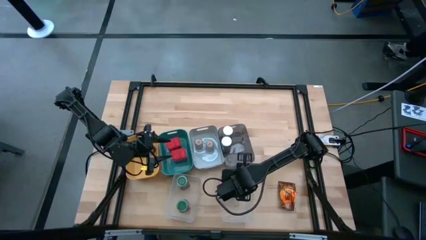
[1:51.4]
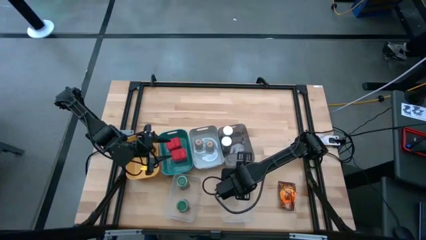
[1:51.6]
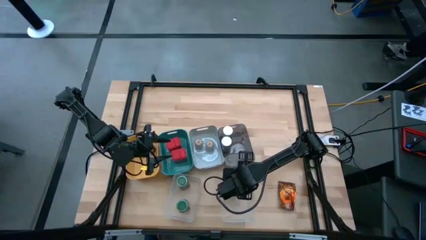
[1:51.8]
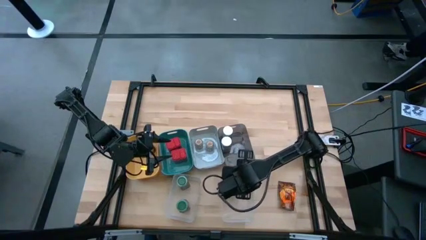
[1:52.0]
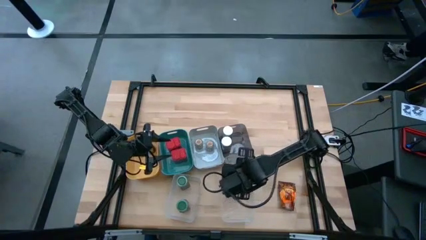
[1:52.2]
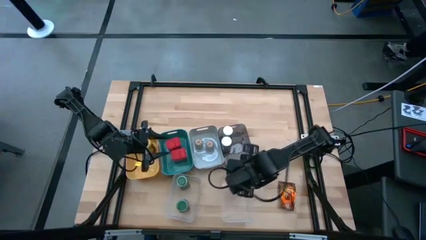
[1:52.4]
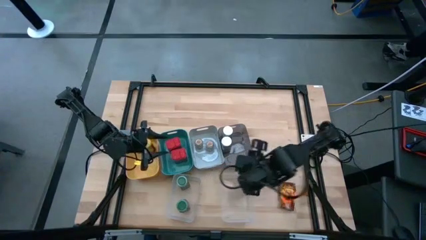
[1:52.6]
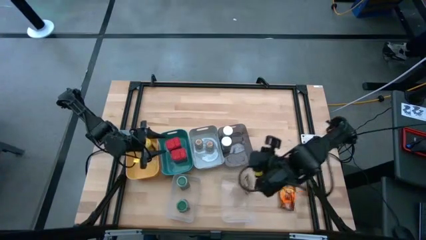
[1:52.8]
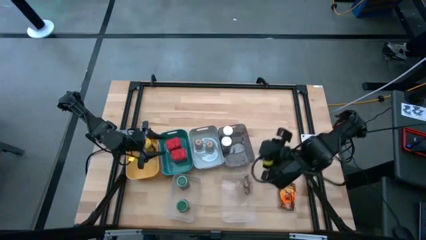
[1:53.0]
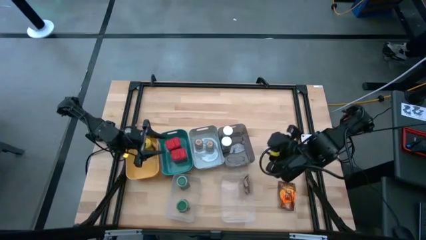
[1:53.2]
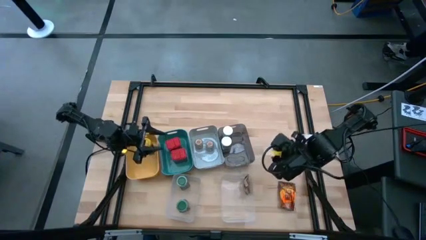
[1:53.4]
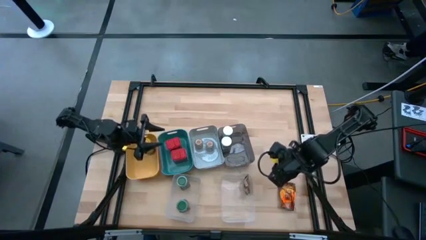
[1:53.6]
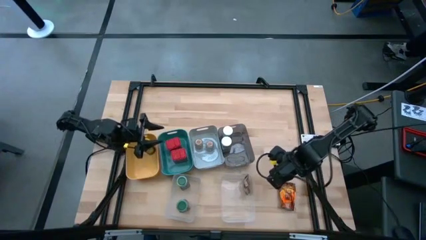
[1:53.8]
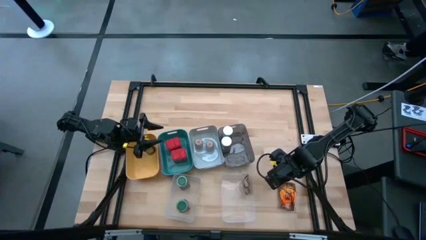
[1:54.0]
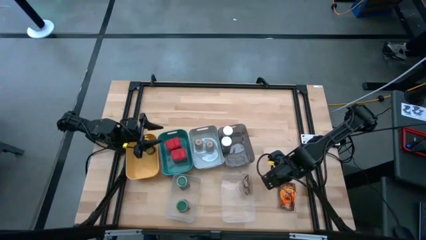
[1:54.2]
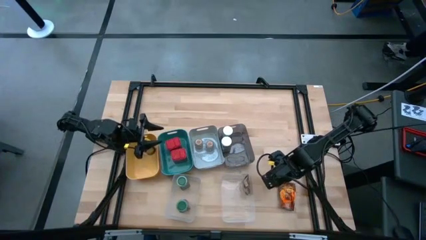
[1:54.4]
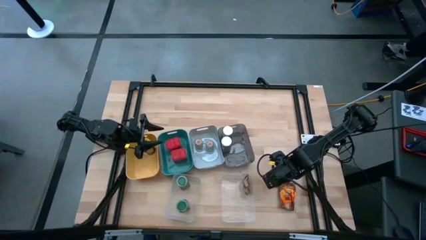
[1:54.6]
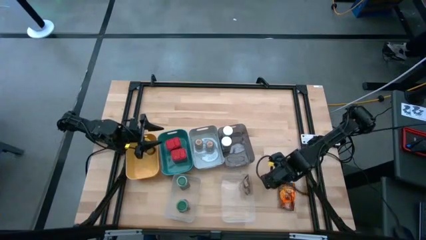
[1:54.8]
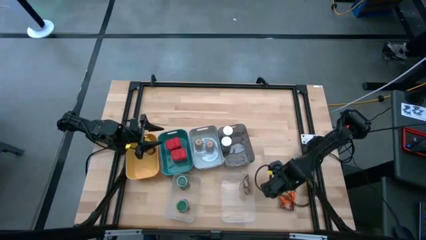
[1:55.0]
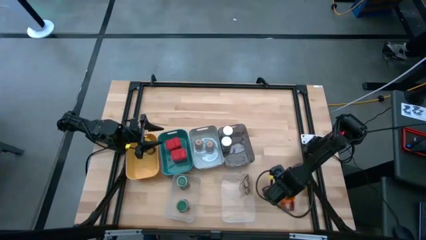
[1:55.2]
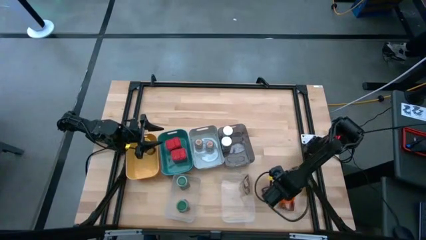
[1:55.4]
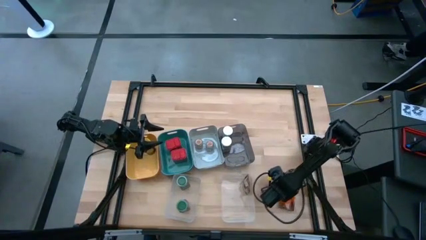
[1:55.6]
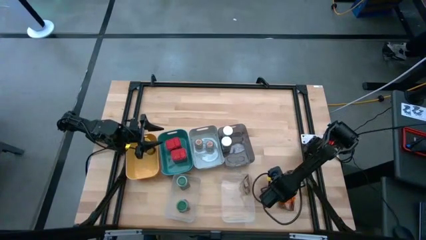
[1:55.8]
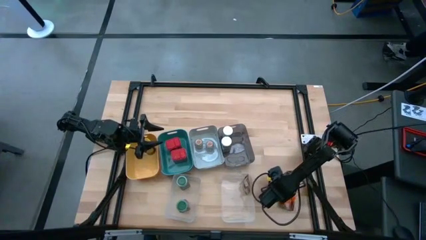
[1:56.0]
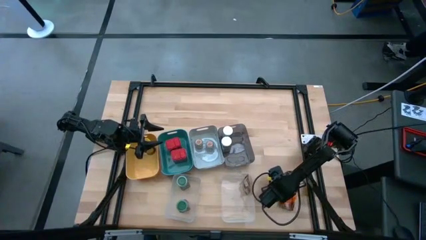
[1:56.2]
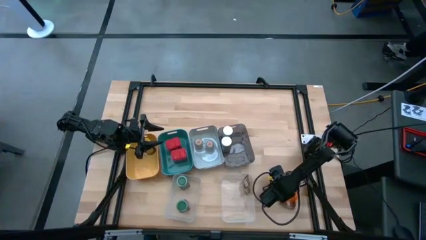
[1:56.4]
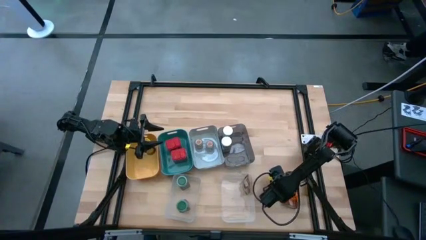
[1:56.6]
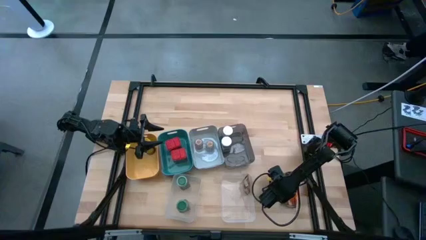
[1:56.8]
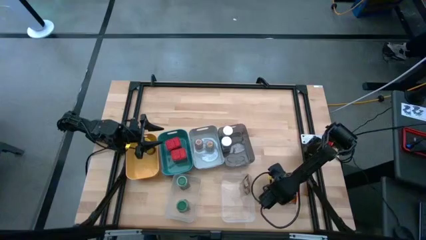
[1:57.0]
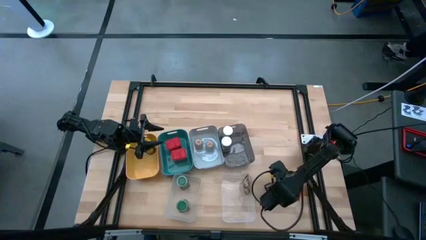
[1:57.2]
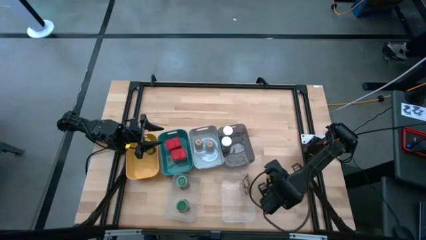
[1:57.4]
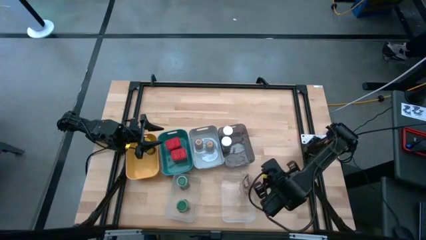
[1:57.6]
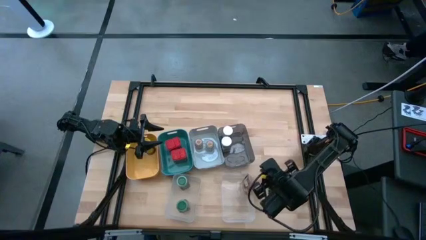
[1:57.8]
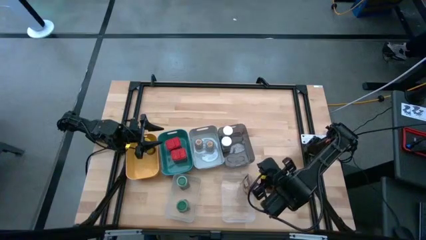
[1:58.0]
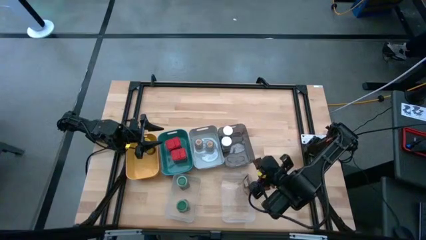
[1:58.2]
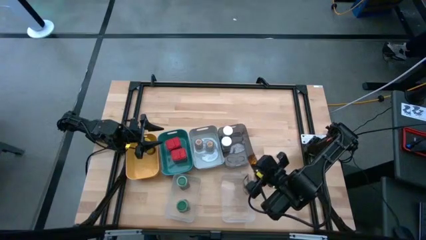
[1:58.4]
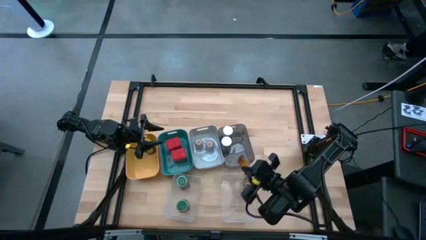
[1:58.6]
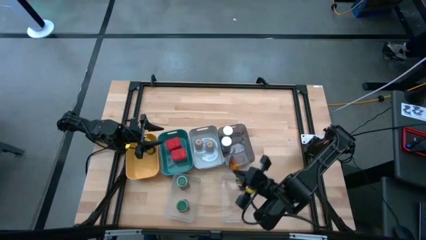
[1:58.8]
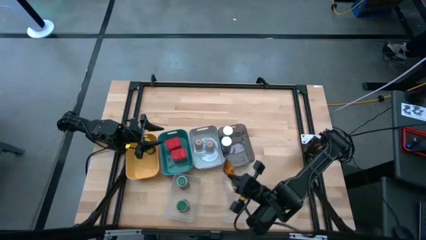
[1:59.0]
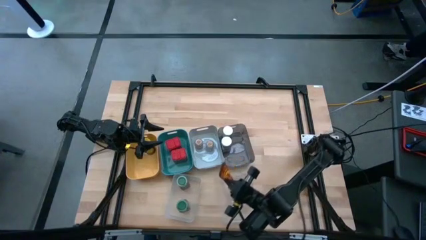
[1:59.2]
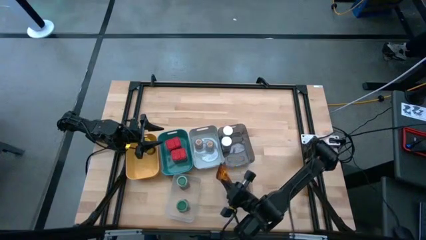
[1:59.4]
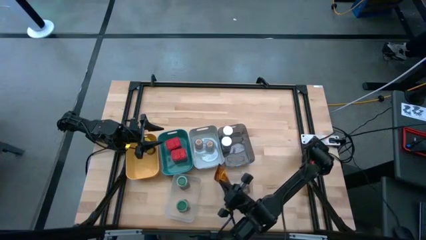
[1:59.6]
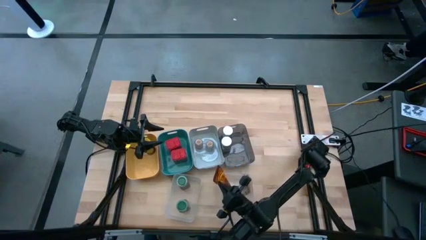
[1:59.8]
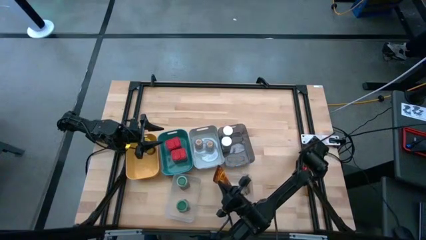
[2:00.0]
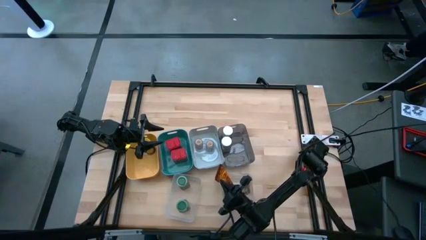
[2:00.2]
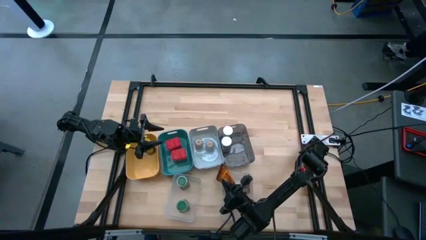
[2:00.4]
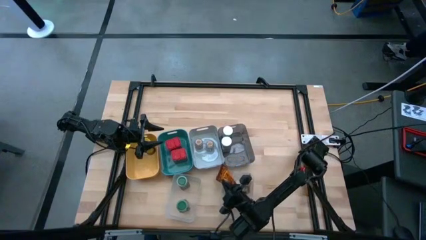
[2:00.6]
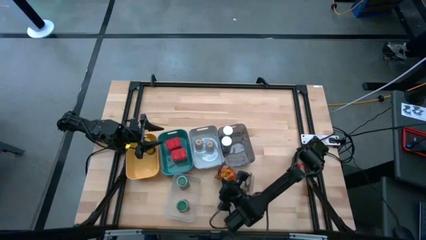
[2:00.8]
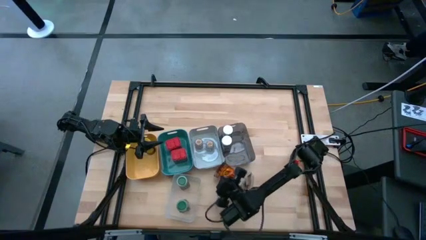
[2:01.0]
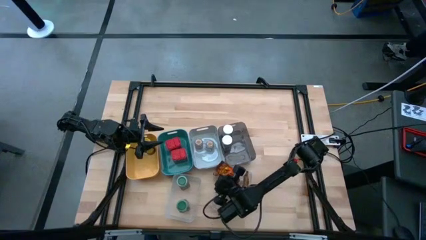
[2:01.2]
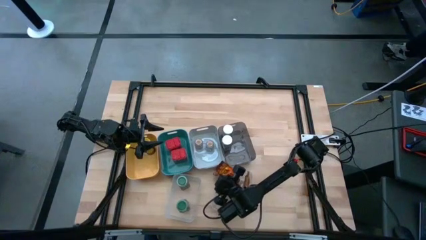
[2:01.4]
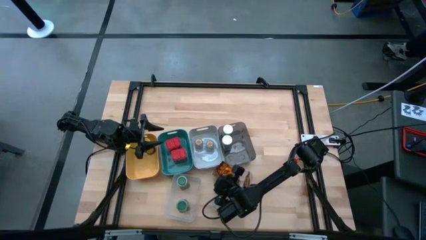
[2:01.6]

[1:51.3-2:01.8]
Task: Sort spices by type
Put the orange seasoning pack into the right transparent bin

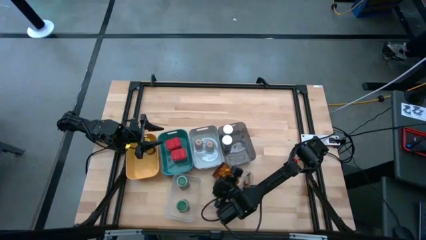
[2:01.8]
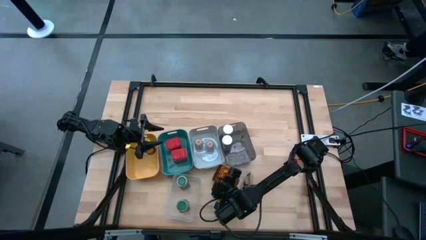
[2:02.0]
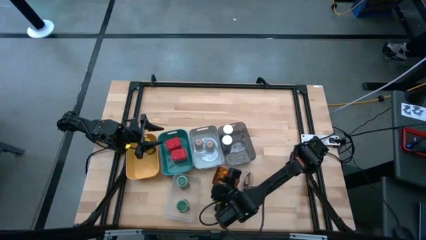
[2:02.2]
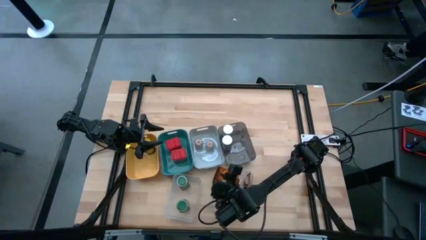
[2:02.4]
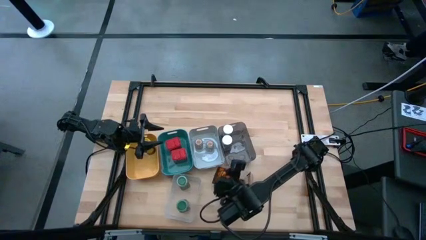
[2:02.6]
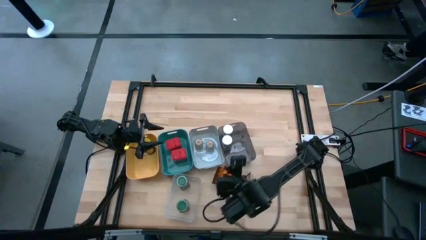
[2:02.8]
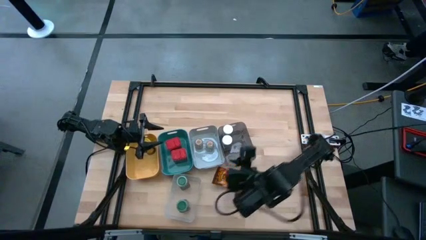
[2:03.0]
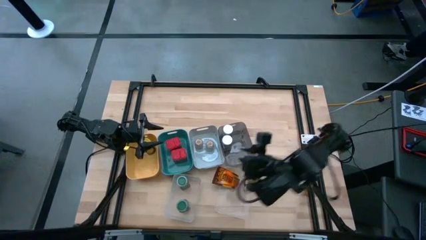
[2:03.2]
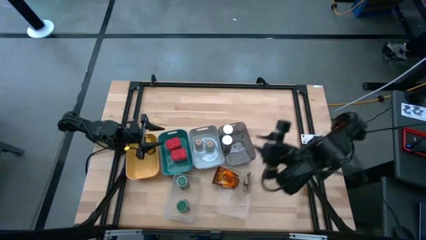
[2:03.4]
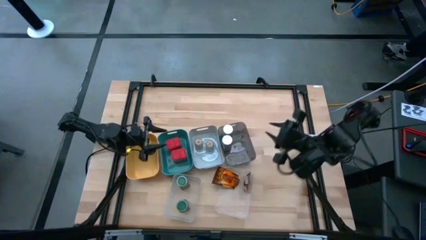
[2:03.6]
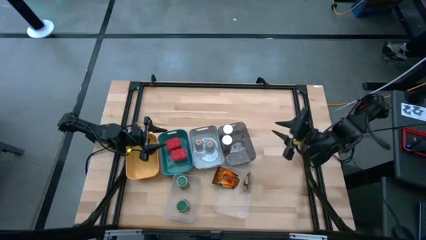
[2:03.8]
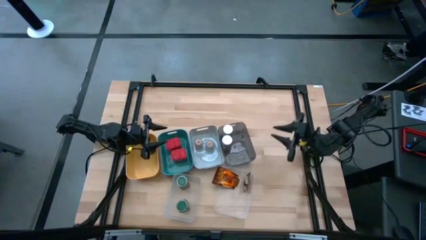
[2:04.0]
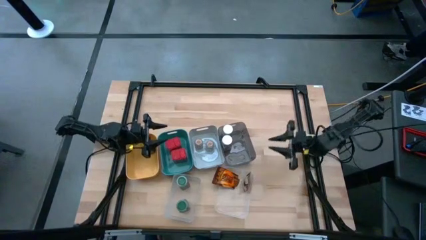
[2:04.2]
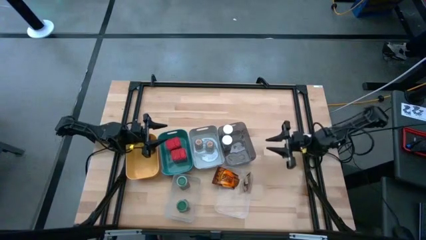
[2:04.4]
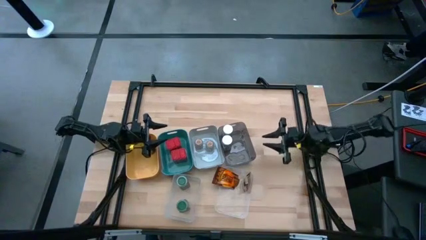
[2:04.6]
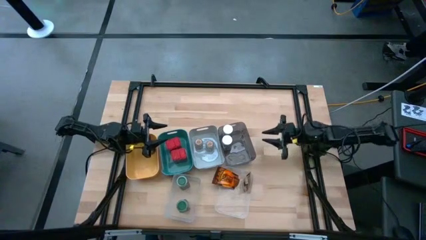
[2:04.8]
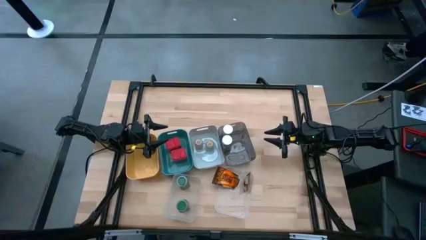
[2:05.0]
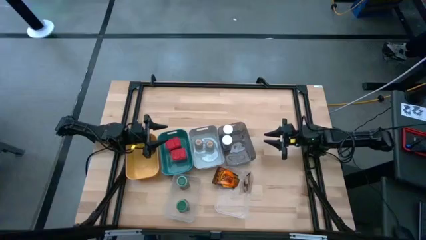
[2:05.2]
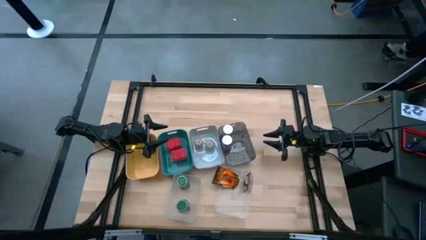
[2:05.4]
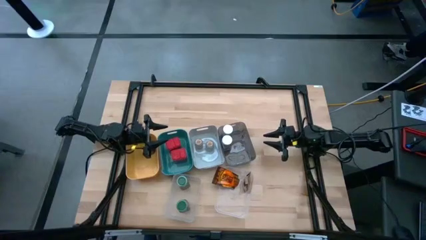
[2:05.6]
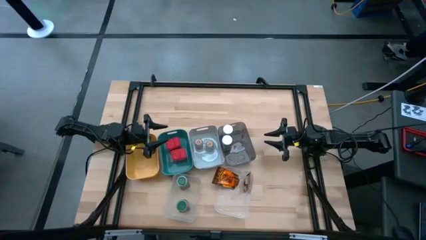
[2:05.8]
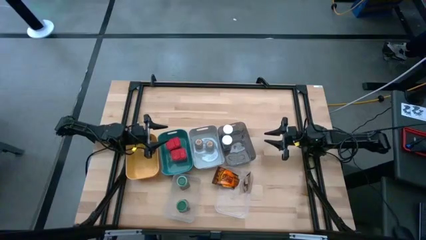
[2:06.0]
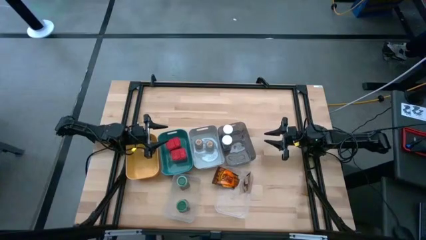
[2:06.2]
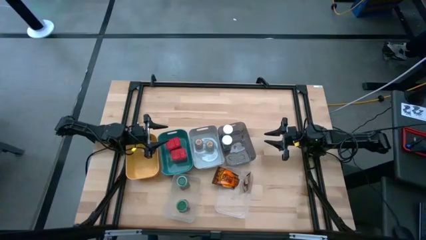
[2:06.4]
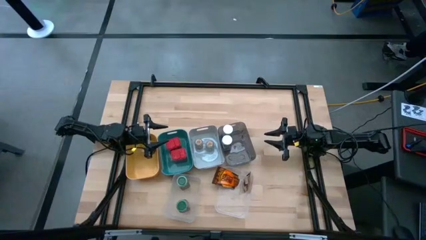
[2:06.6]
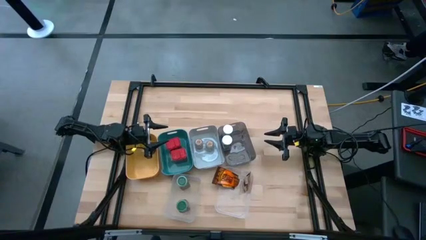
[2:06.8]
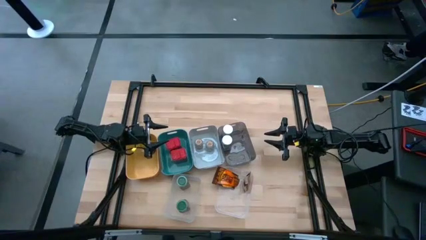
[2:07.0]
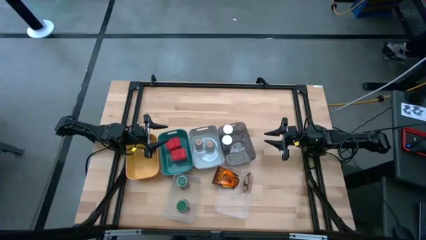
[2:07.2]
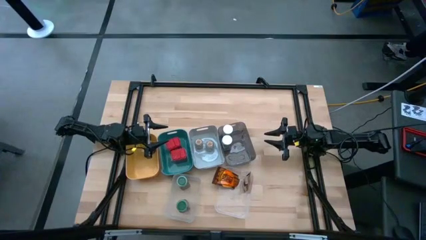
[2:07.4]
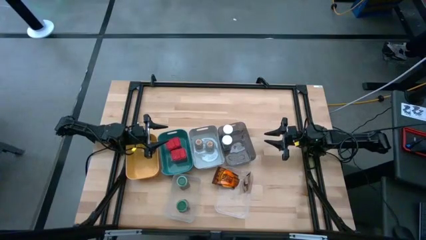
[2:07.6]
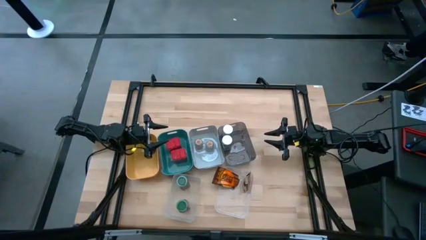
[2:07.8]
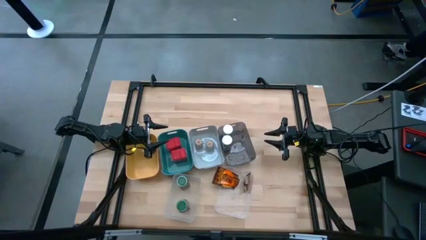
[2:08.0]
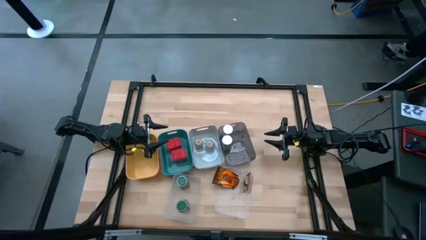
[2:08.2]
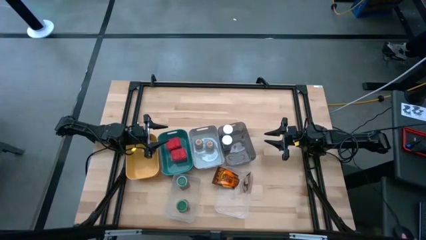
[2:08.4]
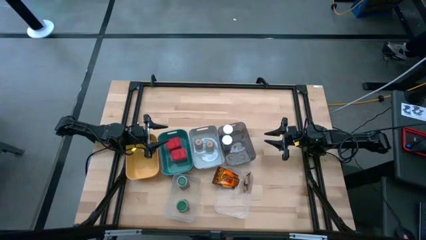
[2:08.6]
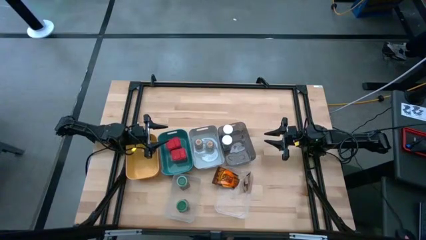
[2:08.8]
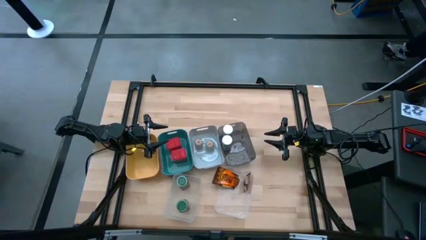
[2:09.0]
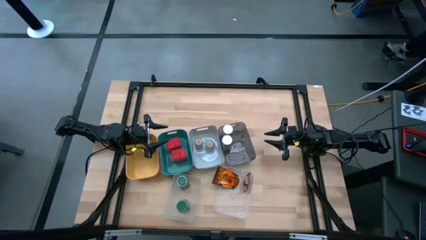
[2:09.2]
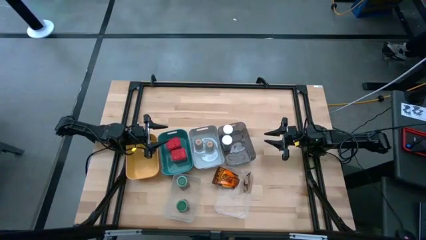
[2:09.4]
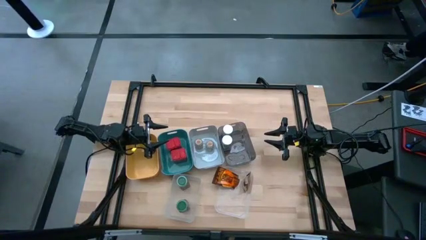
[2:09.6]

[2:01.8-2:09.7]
Return to Home Position
